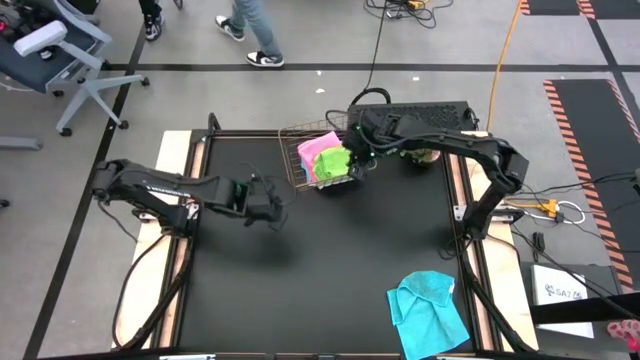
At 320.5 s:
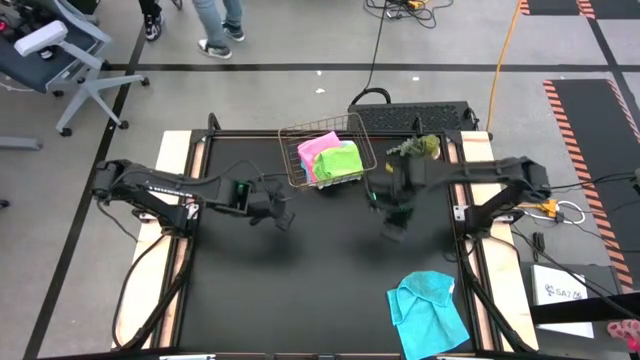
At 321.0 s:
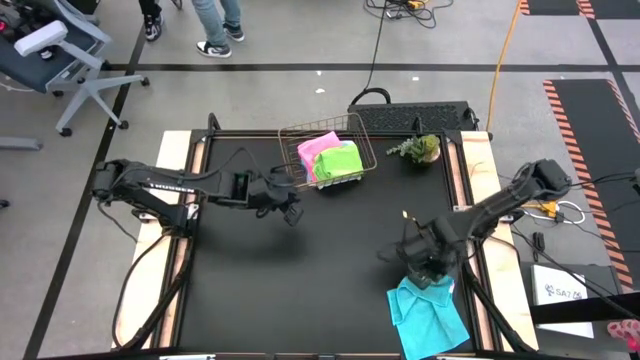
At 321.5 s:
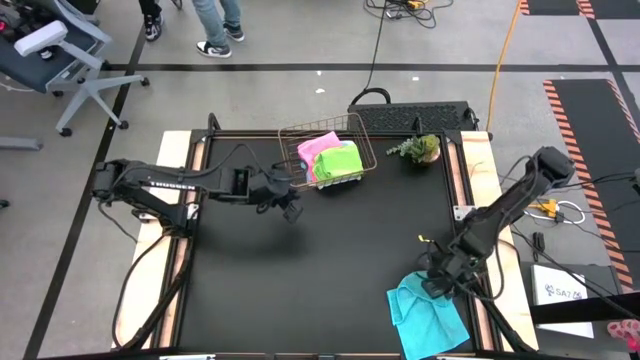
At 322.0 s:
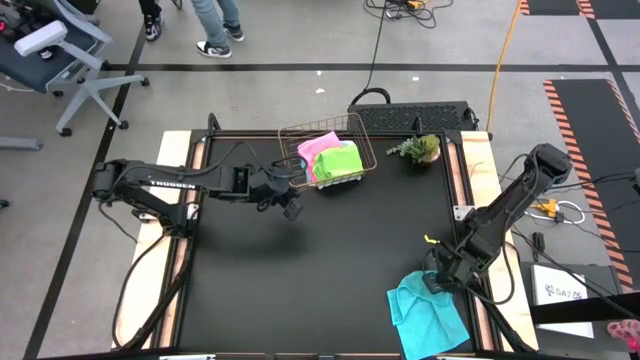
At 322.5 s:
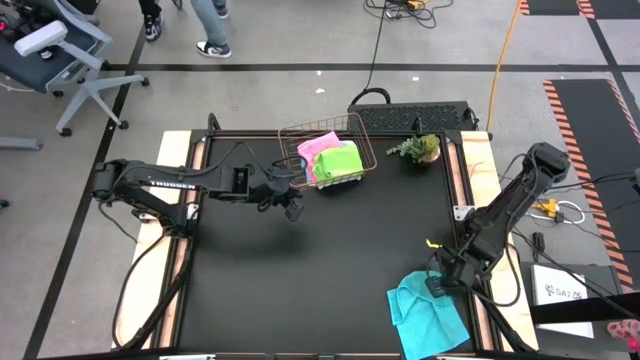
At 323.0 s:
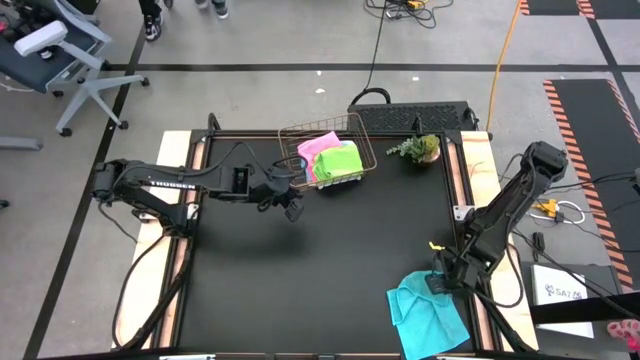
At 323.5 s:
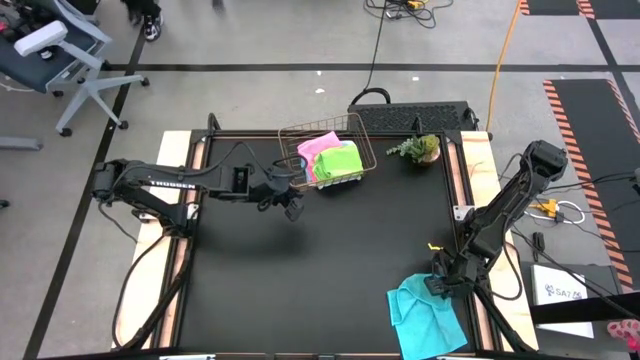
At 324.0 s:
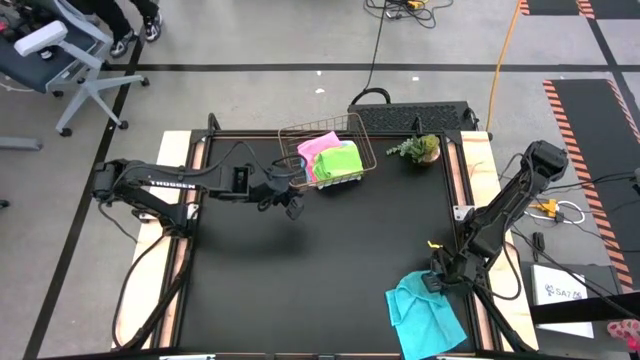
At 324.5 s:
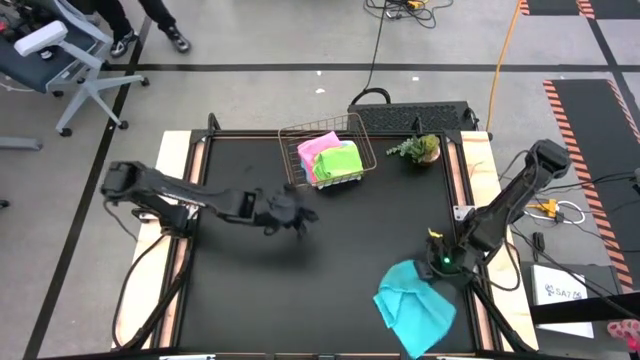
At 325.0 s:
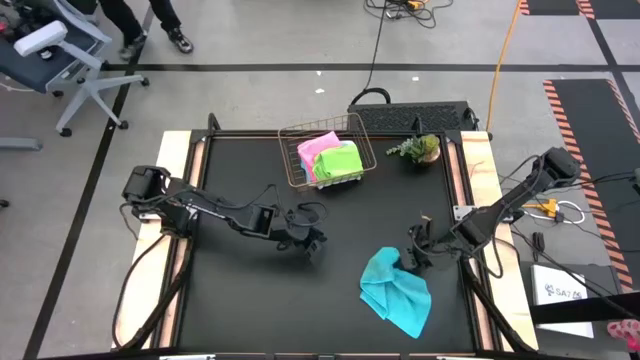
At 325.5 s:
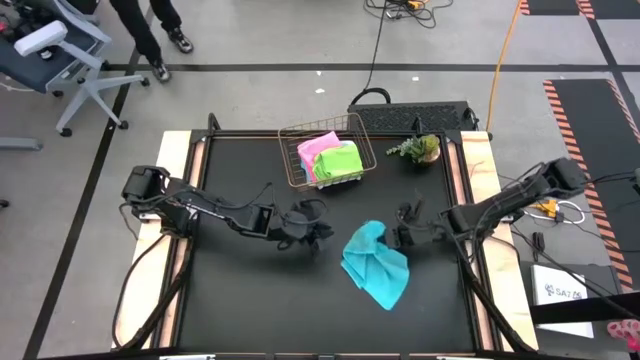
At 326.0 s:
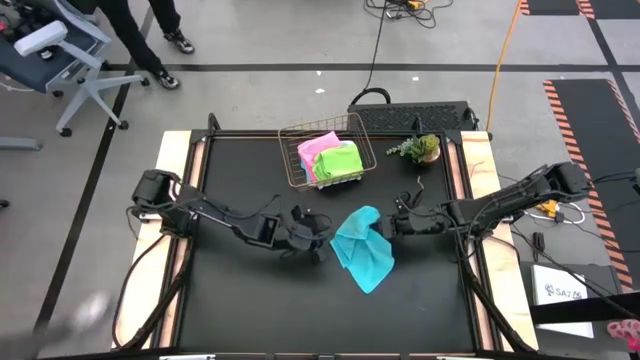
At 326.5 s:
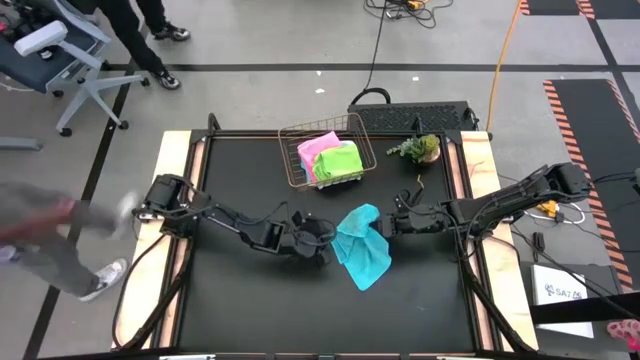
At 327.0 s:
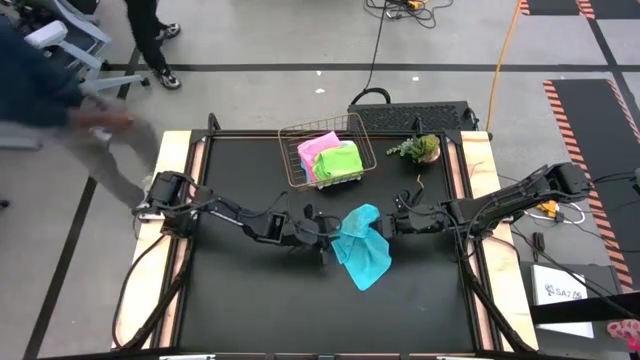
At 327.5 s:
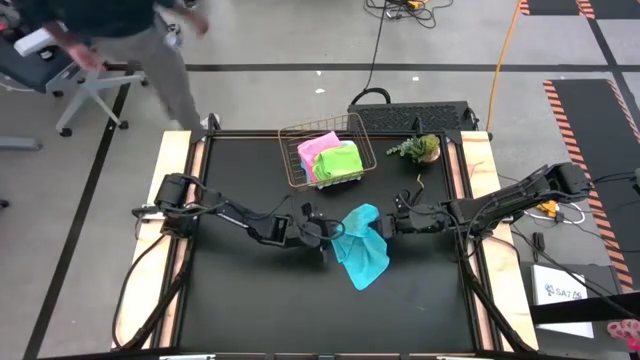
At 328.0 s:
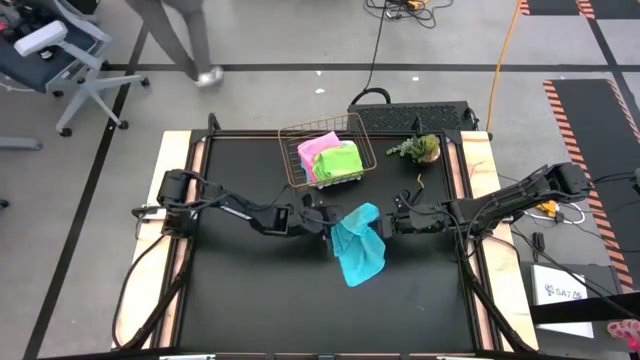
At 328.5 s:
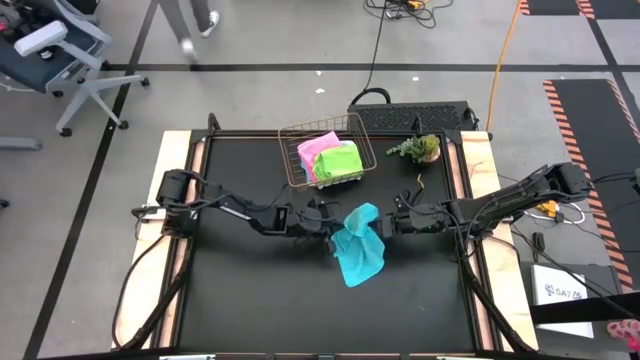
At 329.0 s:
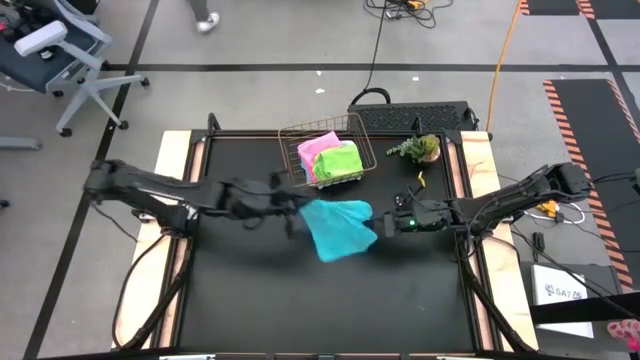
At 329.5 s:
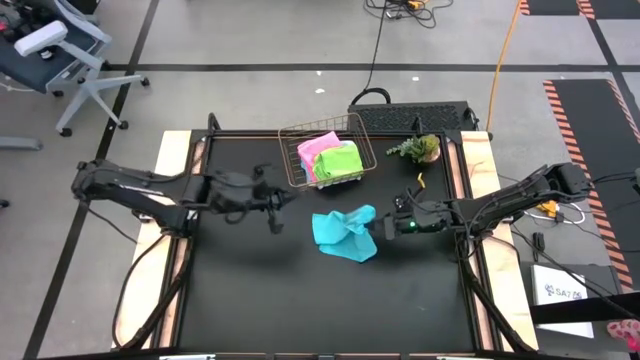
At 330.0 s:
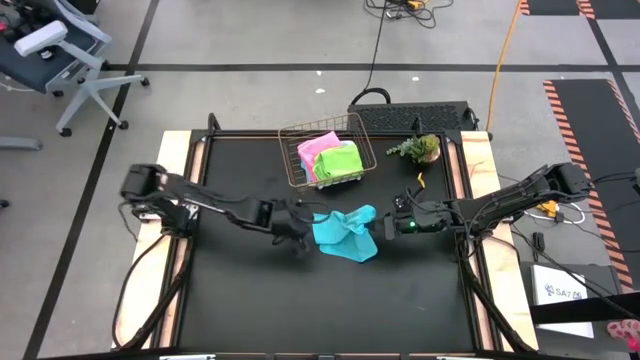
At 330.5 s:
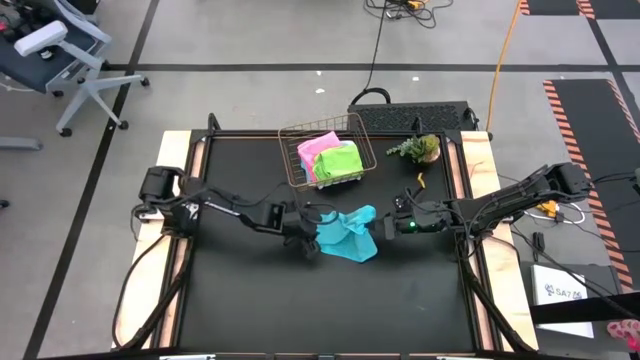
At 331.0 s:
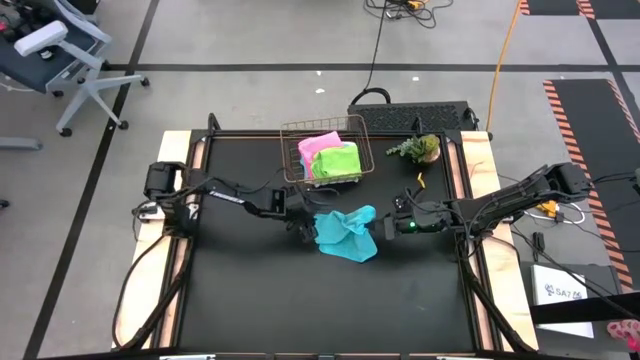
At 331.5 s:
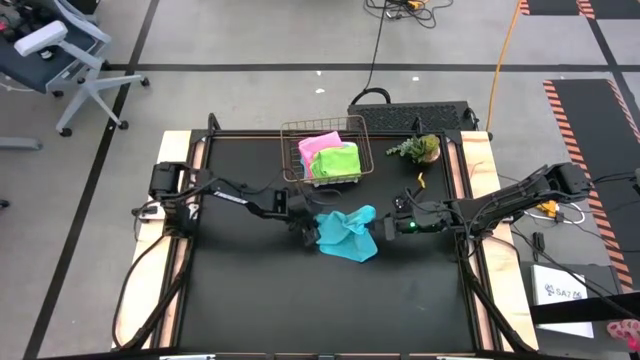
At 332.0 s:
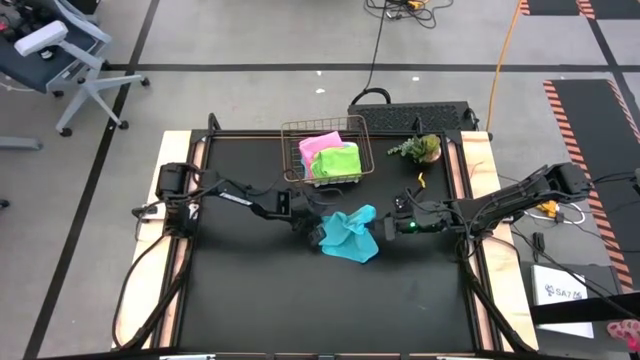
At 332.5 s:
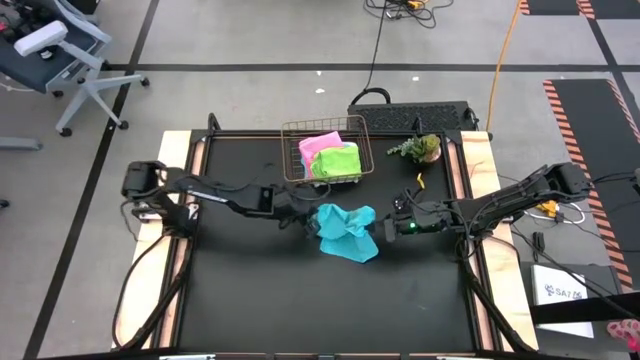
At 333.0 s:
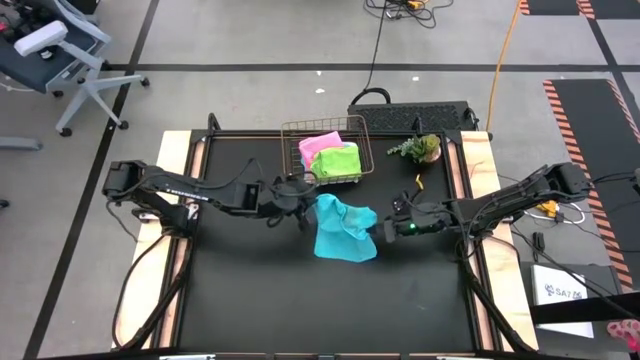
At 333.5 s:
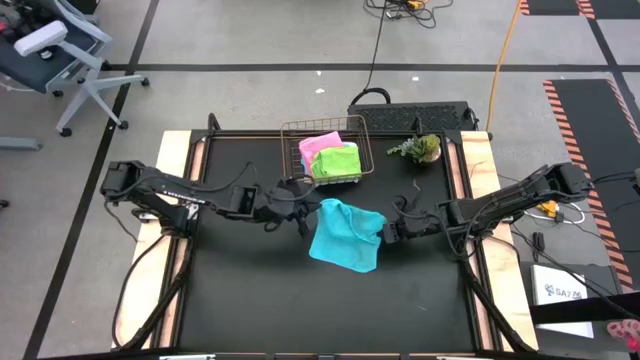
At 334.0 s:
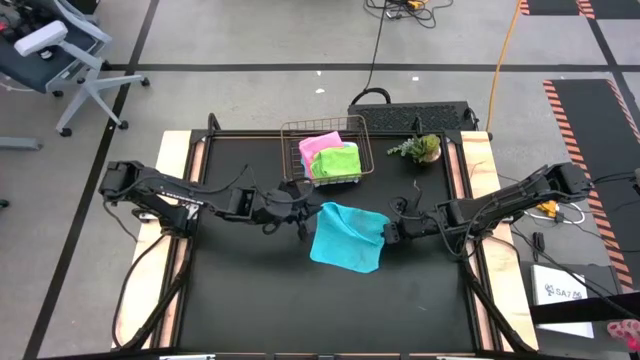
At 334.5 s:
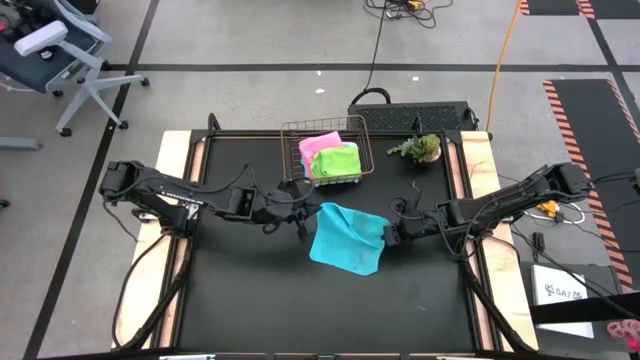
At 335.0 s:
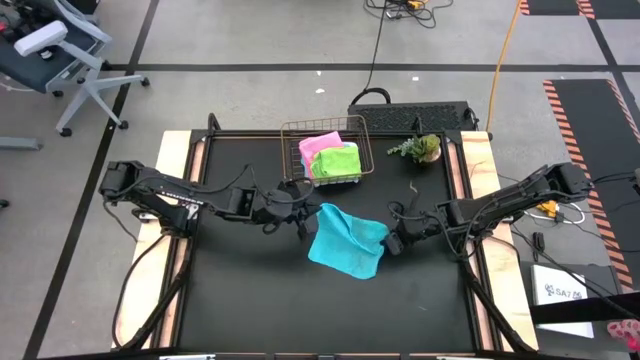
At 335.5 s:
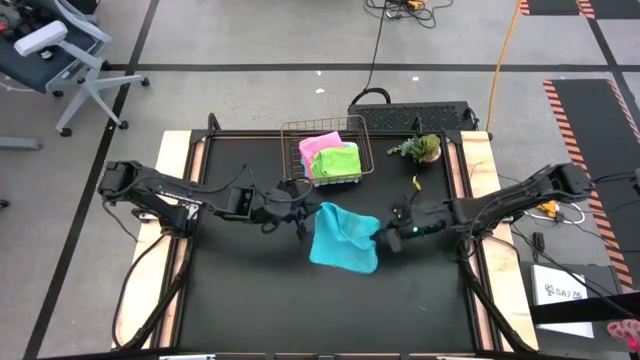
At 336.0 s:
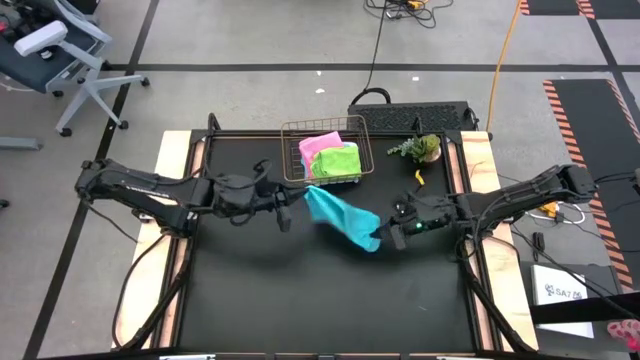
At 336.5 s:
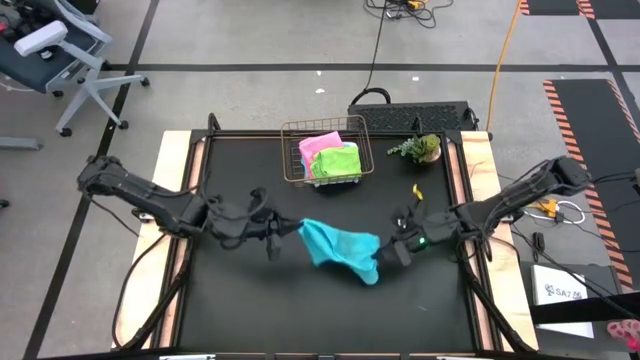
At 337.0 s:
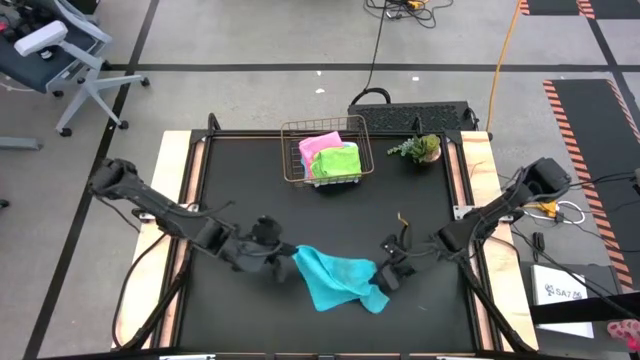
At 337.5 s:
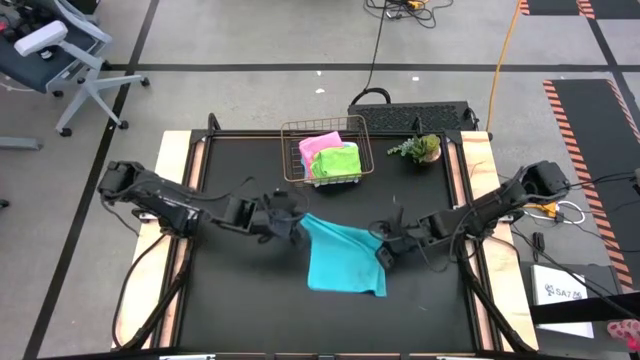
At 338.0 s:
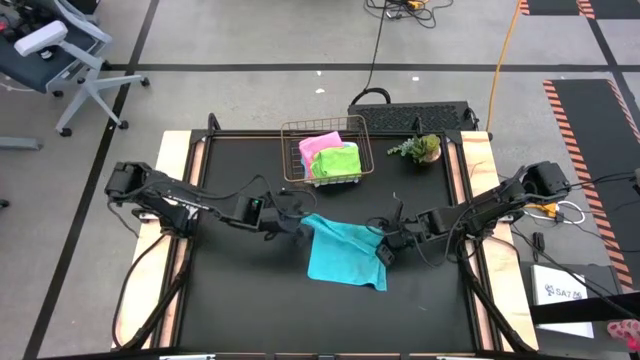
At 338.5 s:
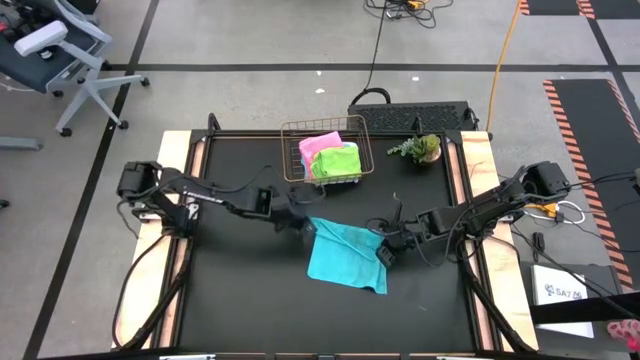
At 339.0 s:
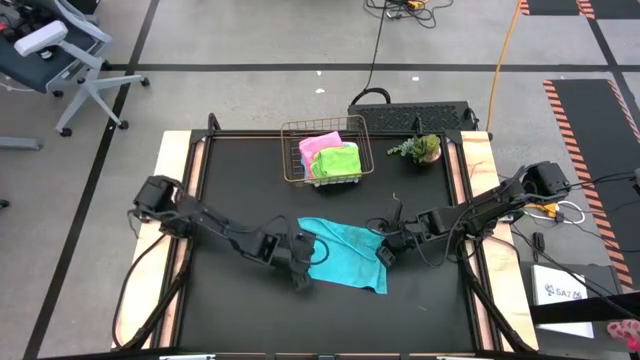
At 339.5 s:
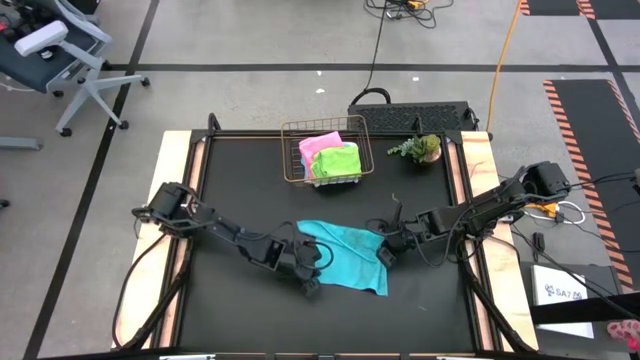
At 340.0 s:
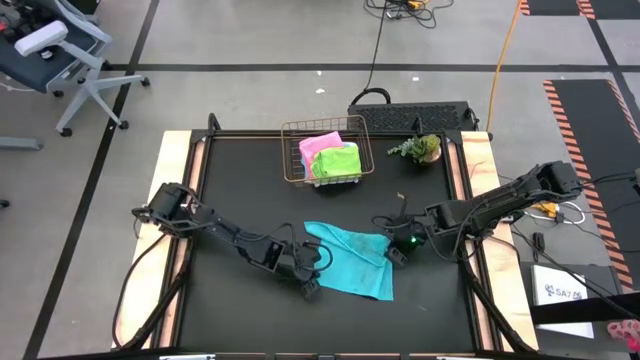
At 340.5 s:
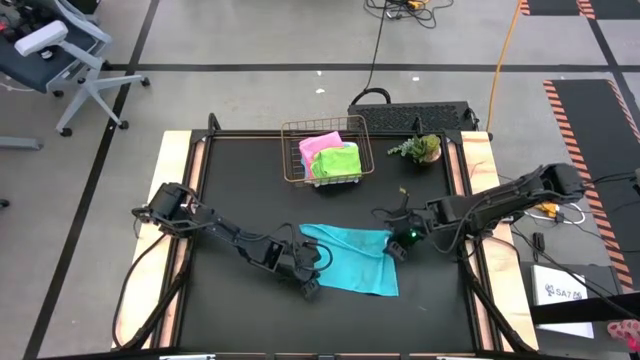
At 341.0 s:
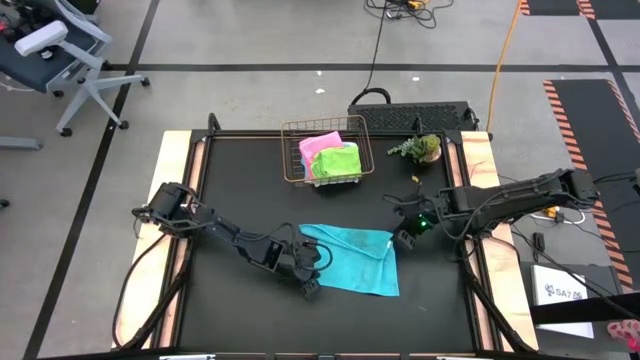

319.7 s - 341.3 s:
Task: Fold microfiber towels
Fold the blue microfiber cloth
